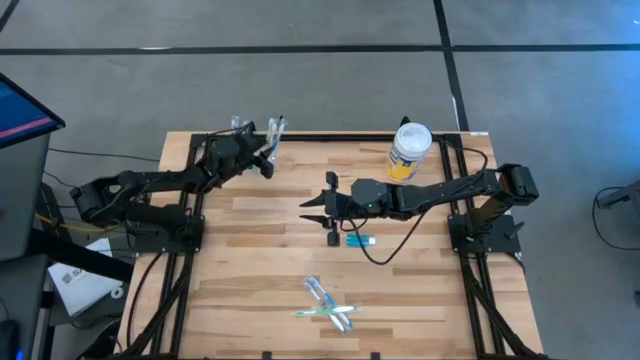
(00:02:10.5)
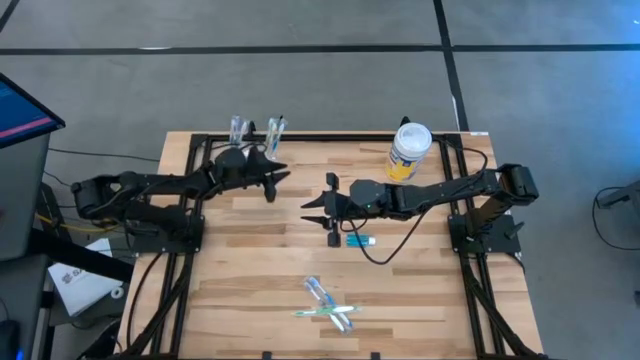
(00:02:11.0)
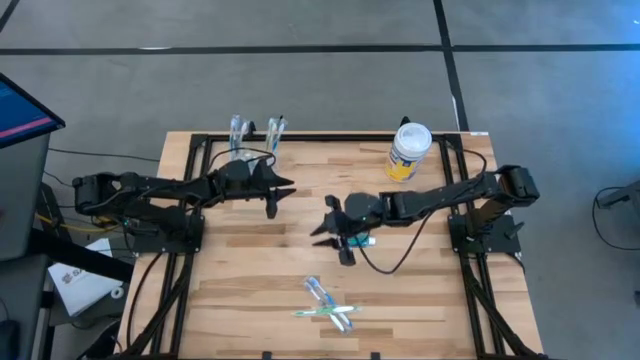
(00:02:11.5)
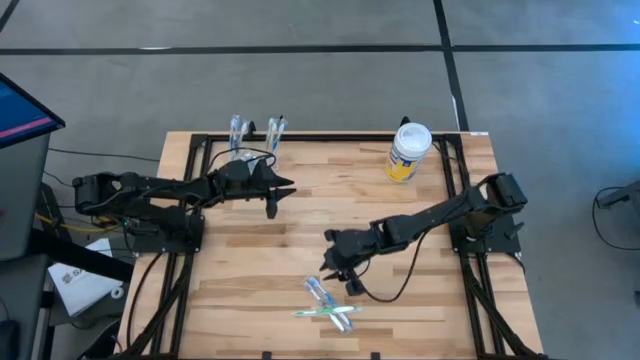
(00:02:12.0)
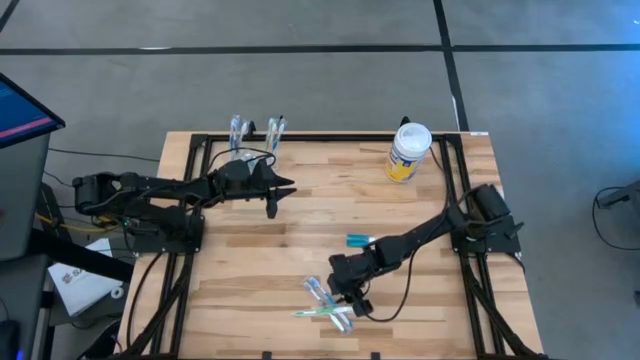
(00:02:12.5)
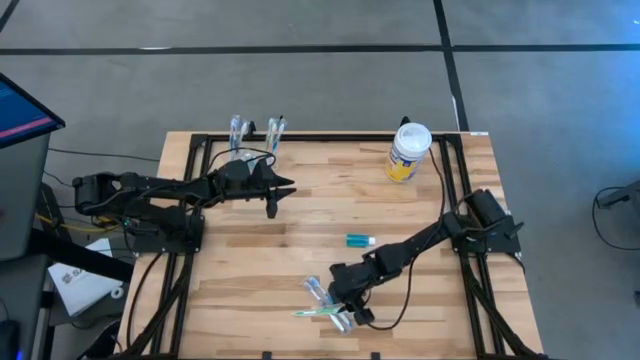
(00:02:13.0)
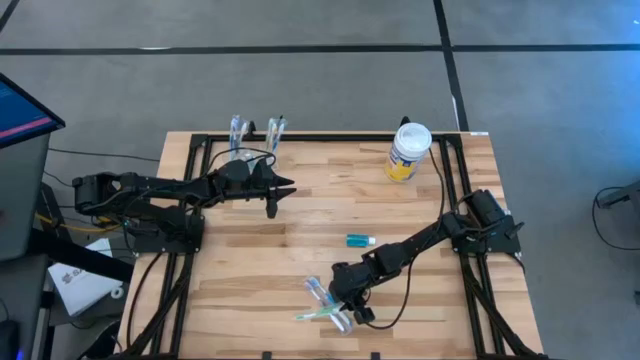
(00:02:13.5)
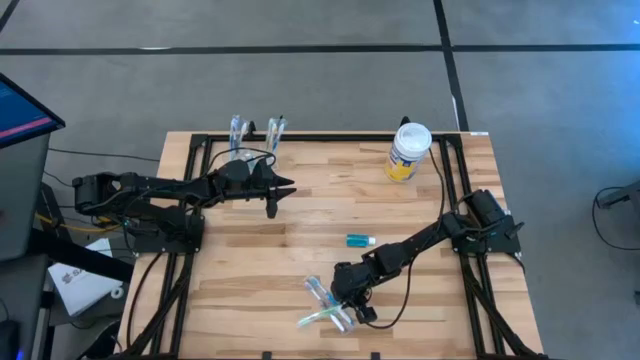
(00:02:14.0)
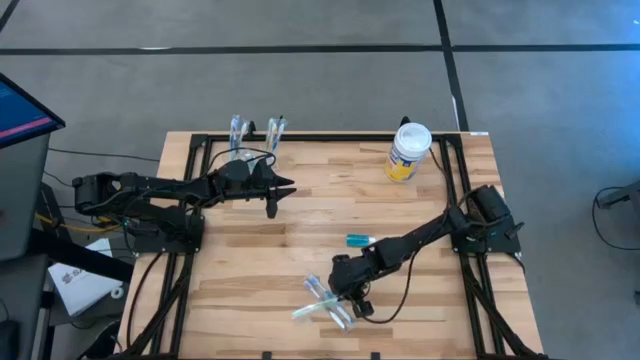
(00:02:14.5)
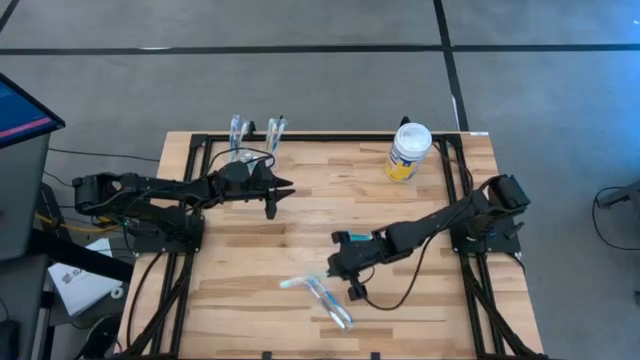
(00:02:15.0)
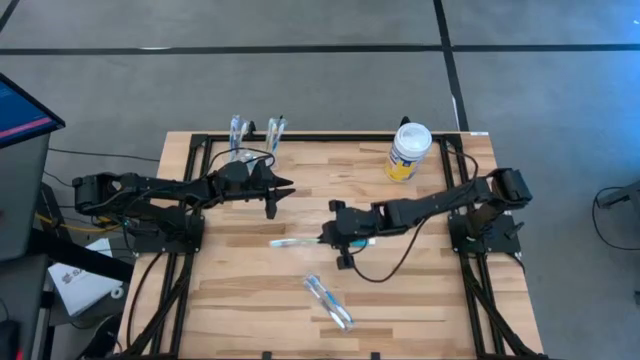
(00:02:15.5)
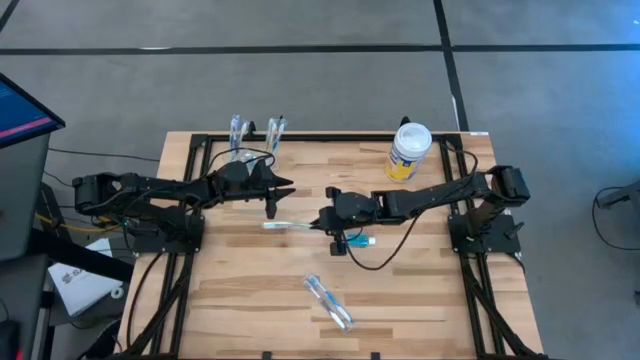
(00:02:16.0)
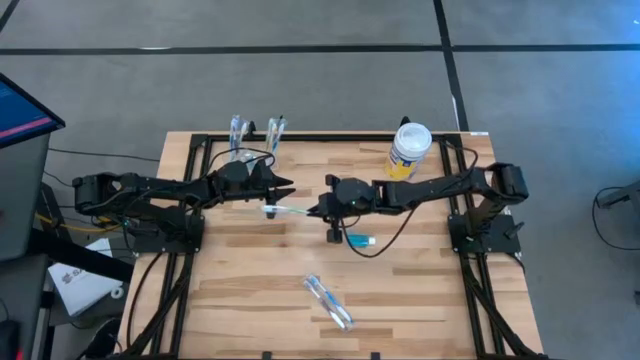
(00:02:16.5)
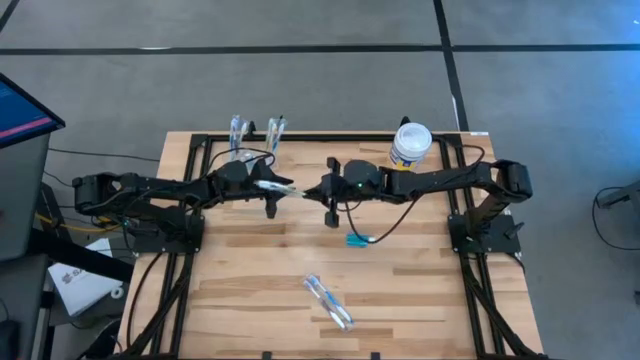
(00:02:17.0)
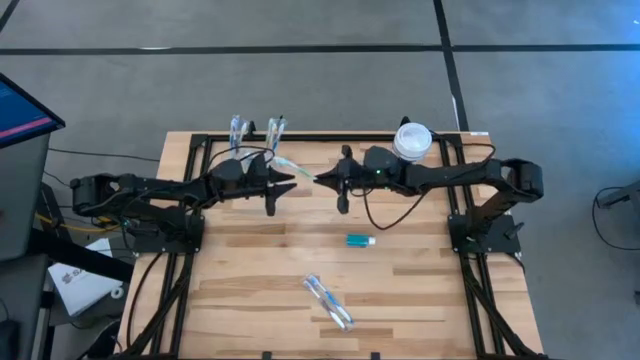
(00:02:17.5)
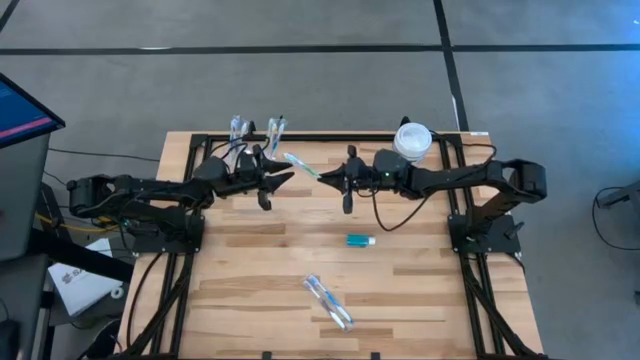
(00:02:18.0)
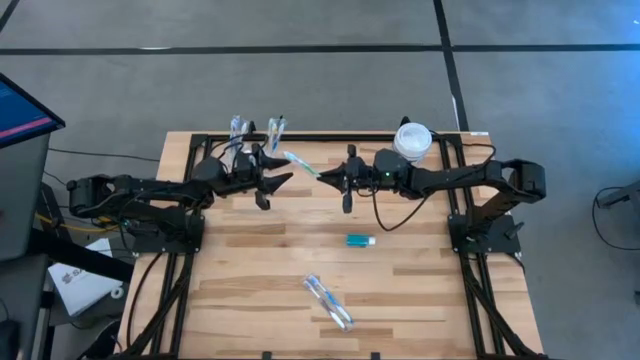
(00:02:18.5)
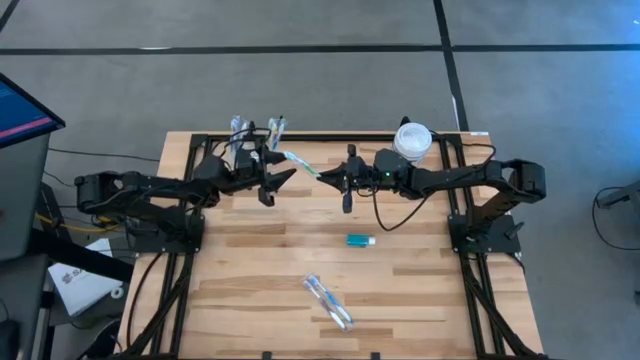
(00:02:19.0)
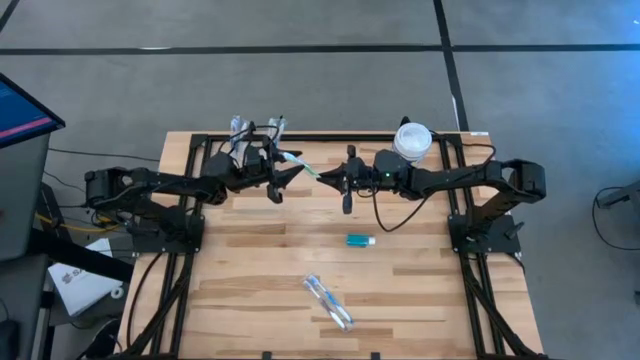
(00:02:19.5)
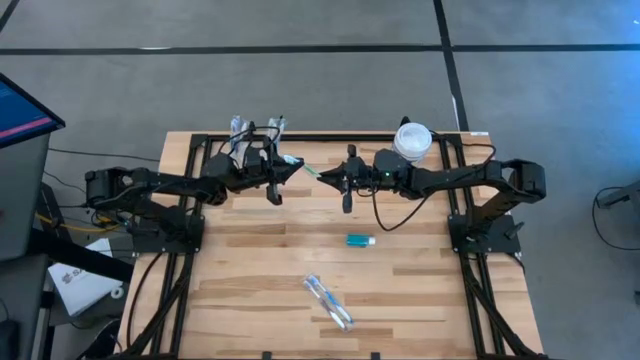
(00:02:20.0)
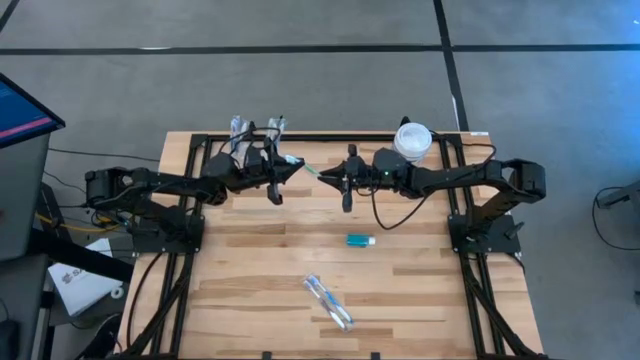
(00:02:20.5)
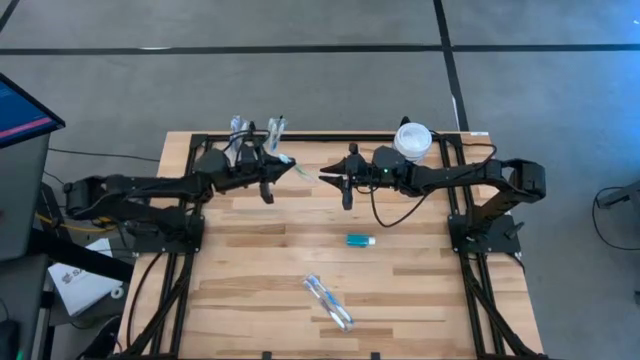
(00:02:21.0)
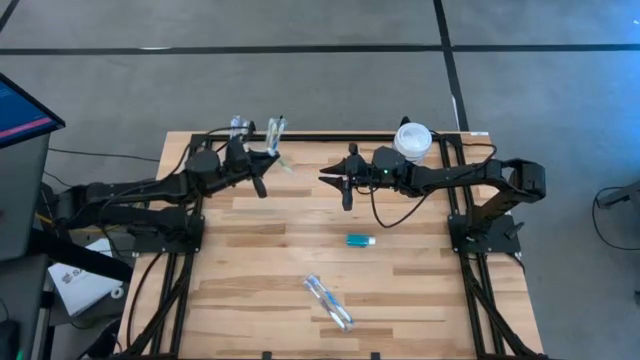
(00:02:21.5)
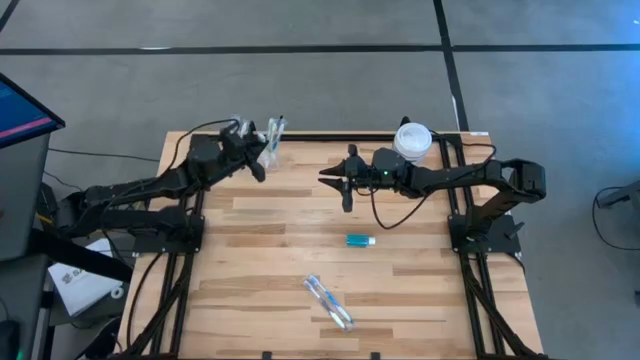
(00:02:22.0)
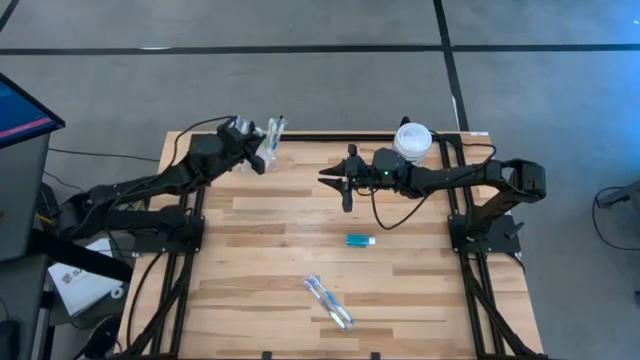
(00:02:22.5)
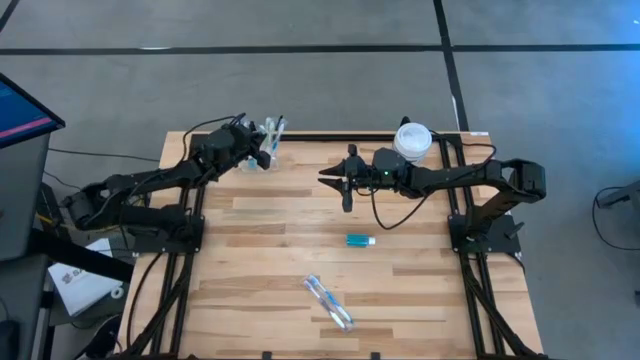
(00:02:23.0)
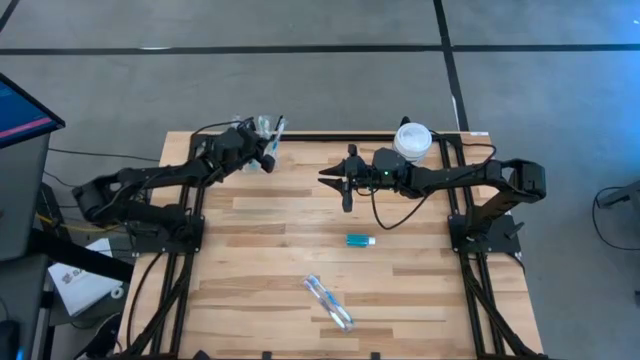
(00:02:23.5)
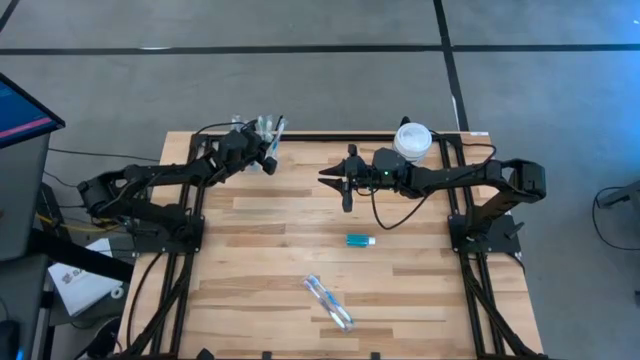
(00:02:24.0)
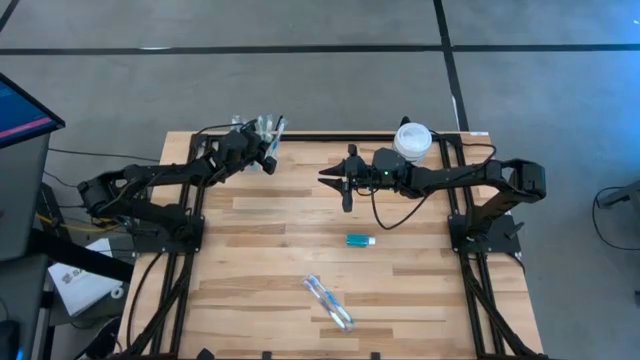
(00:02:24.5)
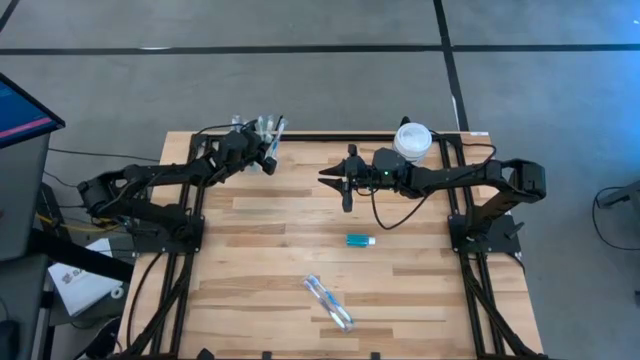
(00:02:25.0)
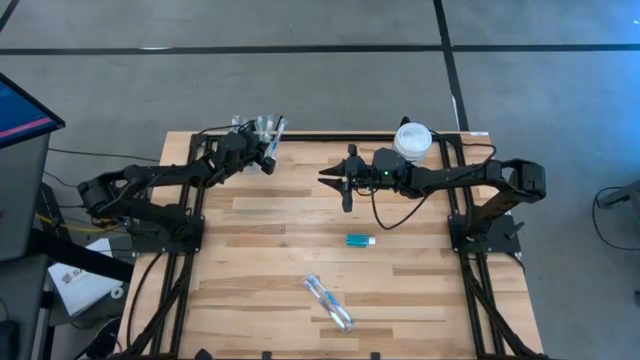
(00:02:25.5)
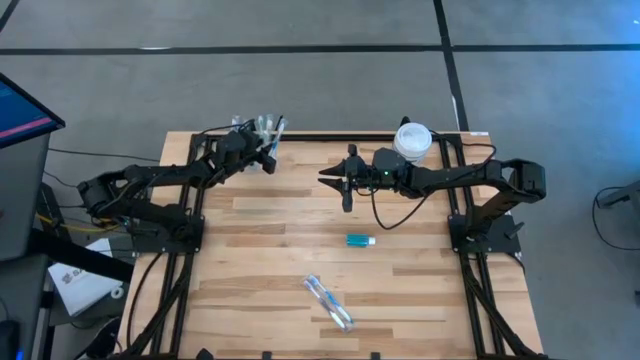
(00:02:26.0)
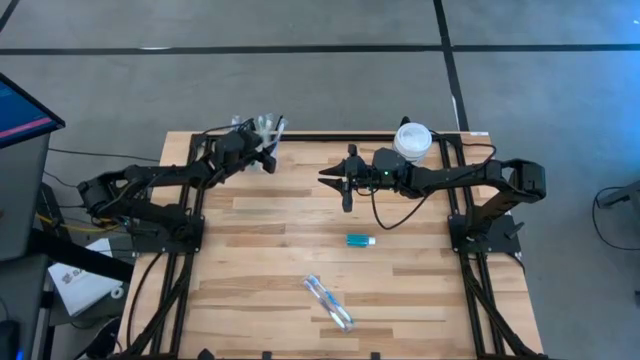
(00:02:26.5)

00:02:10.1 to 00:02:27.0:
Task: Pick & Place toothbrushing station
Put the green toothbrush into the transparent organizer
